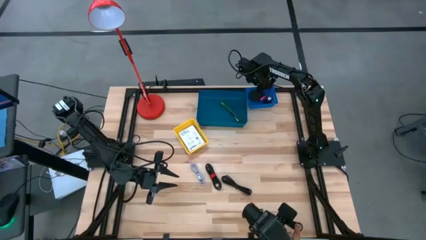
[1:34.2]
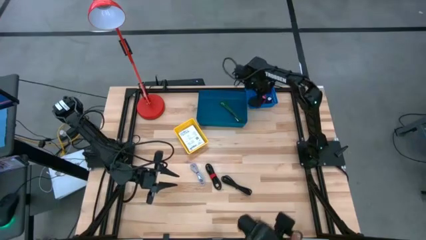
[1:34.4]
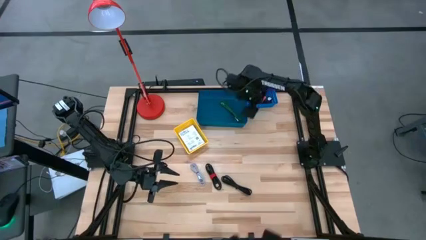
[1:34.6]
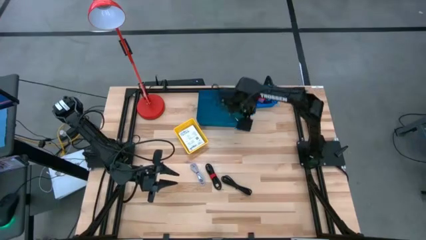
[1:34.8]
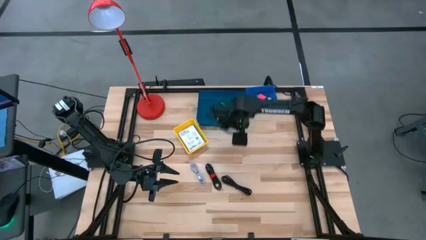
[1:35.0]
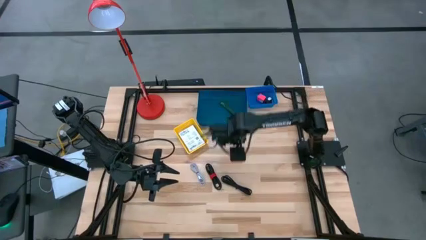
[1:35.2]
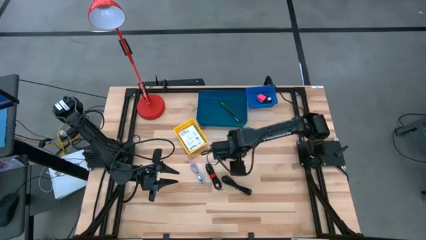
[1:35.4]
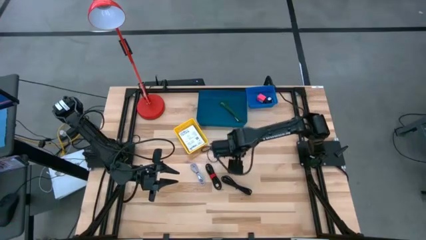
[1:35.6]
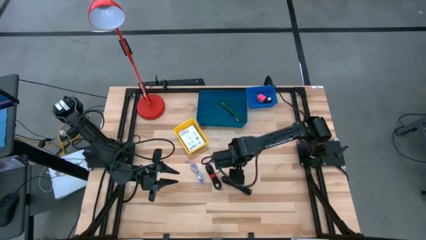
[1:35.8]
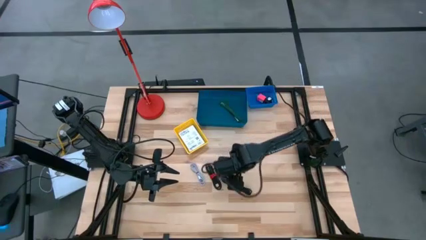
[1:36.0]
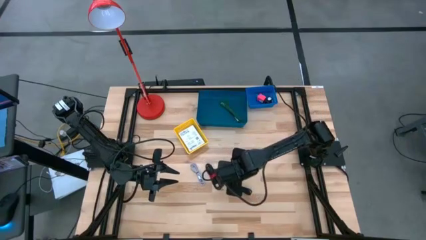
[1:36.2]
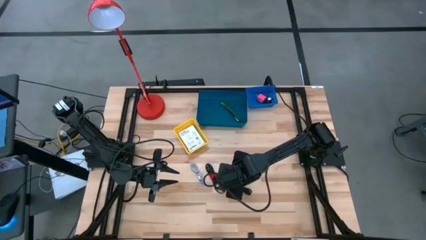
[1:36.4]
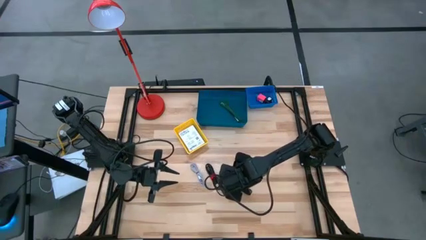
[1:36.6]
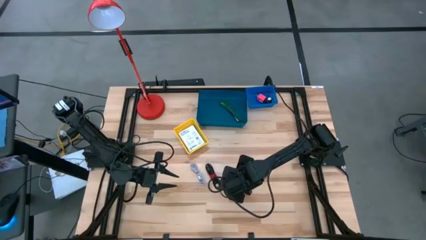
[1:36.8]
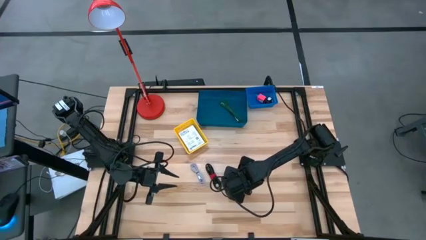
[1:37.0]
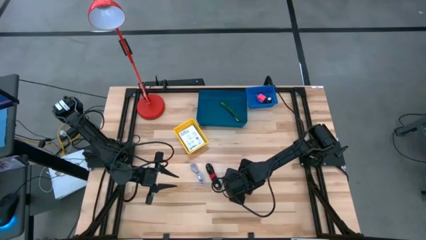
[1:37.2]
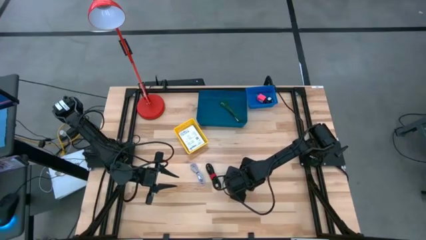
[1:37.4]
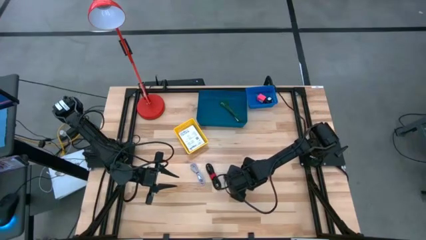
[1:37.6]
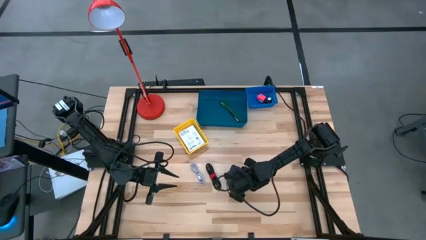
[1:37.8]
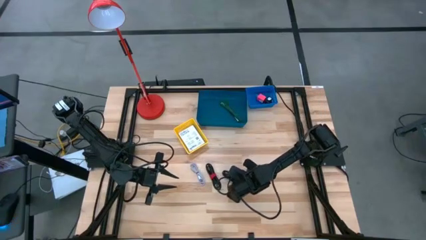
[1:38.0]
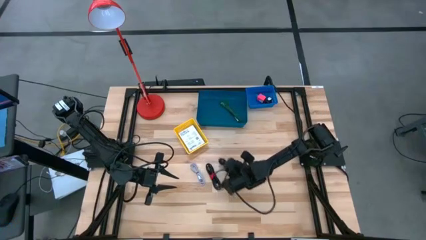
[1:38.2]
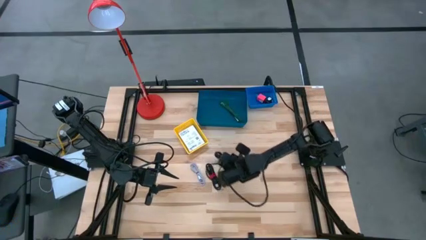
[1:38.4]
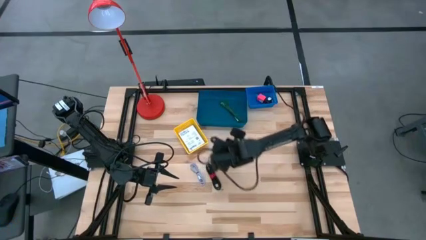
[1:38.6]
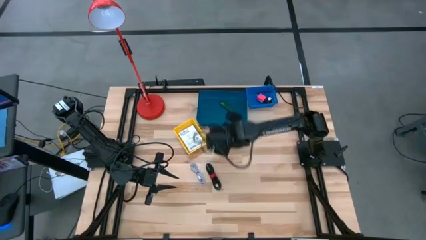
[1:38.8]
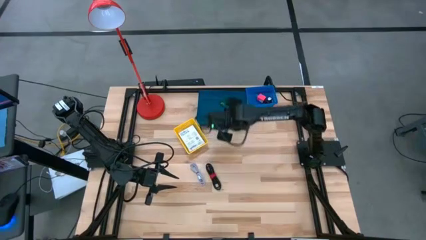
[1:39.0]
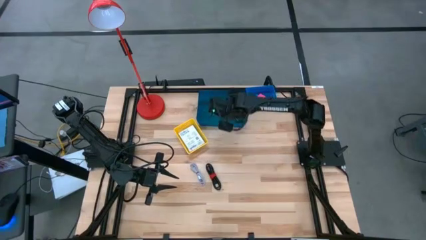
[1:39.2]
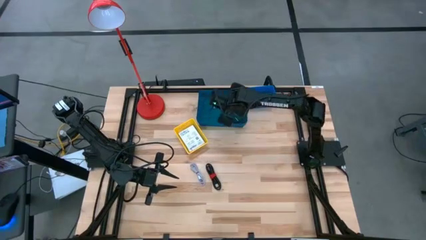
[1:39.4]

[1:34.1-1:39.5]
Task: Pick and place items into bin
Put the right black charger cable into the dark blue bin

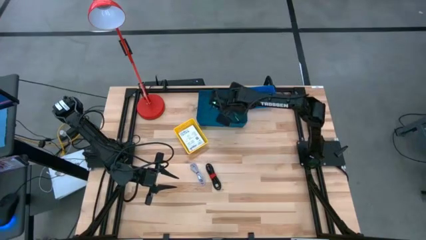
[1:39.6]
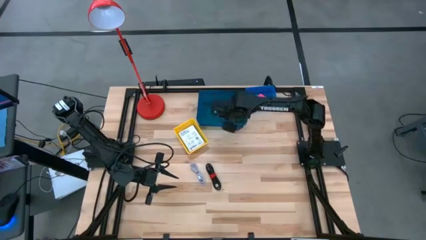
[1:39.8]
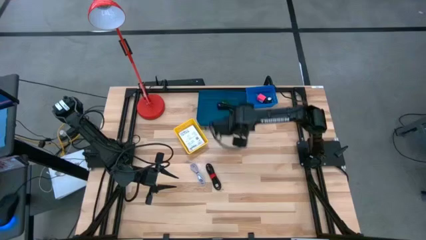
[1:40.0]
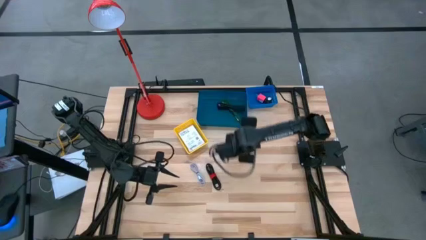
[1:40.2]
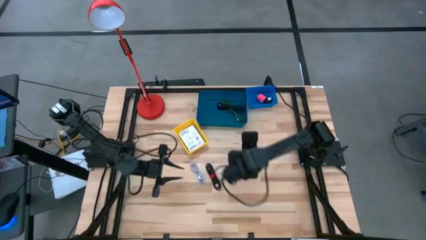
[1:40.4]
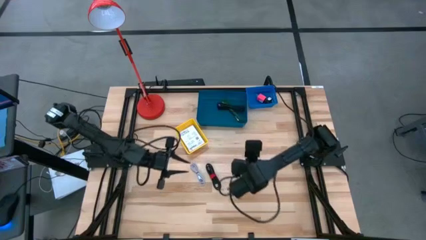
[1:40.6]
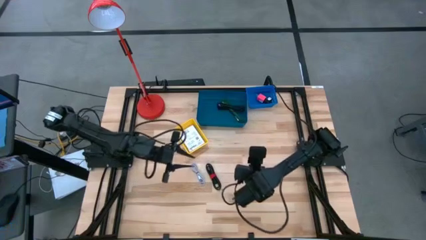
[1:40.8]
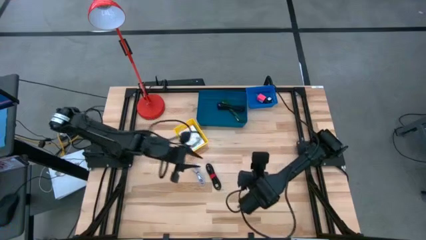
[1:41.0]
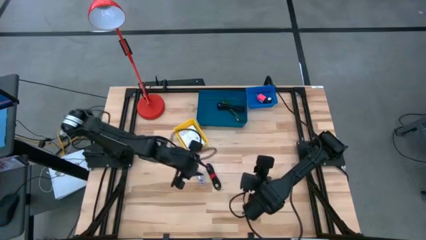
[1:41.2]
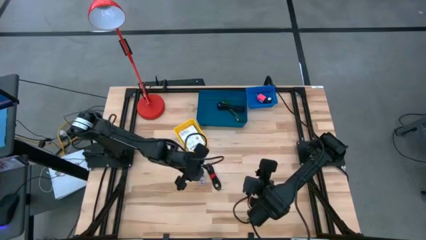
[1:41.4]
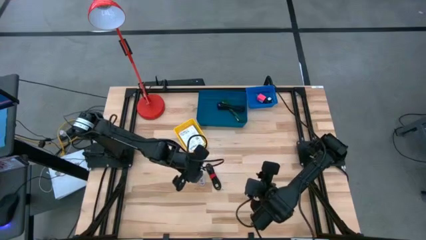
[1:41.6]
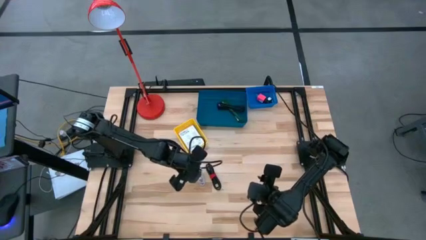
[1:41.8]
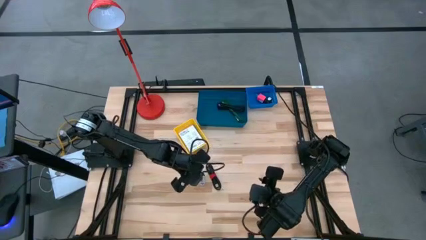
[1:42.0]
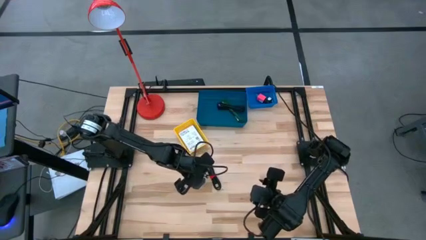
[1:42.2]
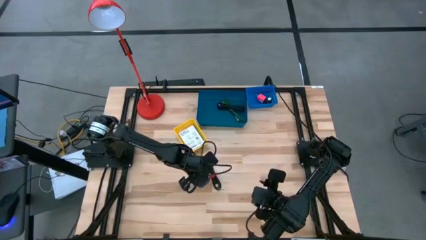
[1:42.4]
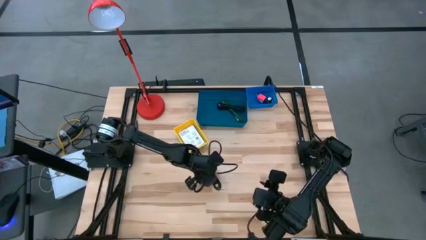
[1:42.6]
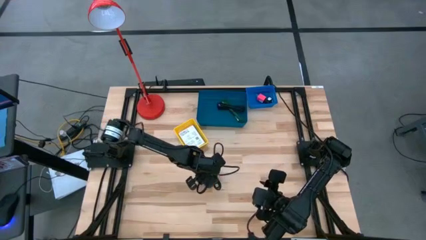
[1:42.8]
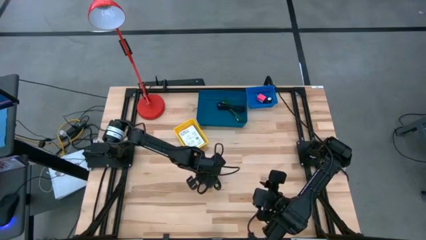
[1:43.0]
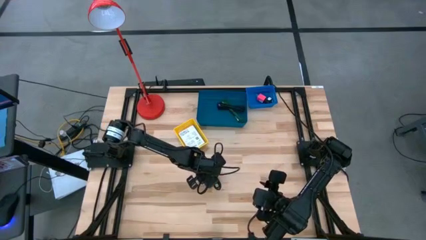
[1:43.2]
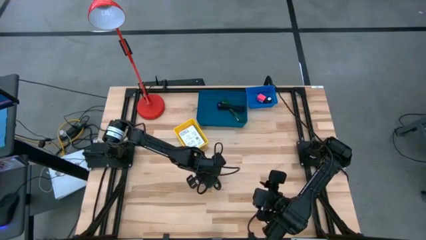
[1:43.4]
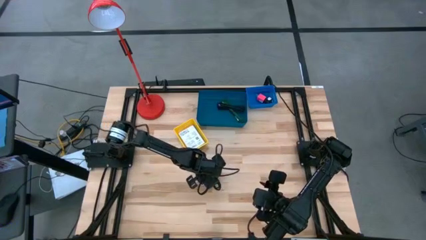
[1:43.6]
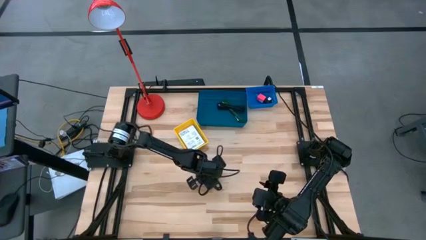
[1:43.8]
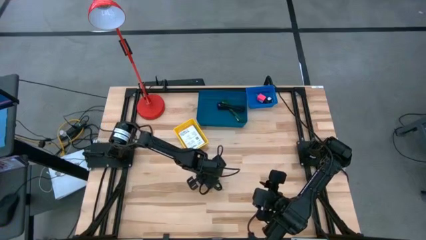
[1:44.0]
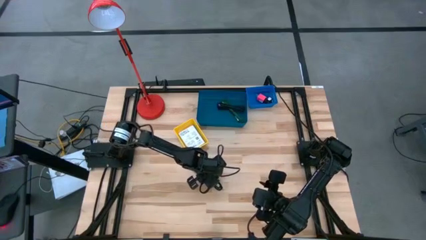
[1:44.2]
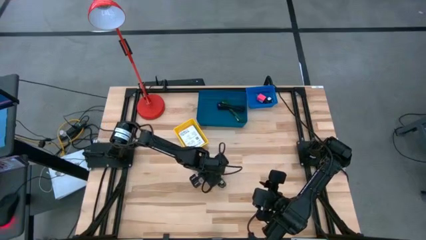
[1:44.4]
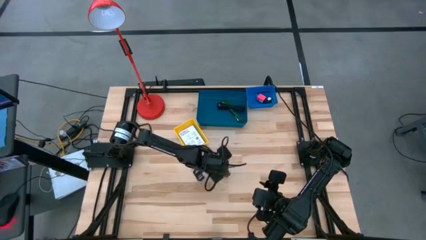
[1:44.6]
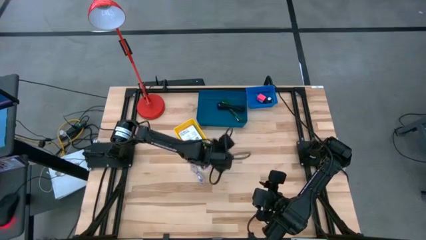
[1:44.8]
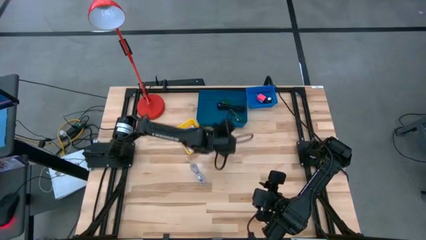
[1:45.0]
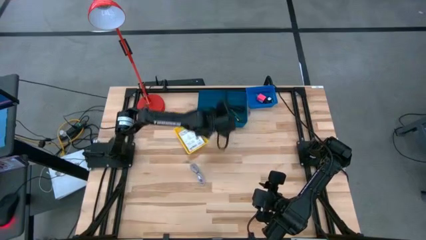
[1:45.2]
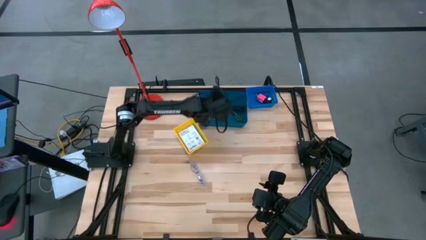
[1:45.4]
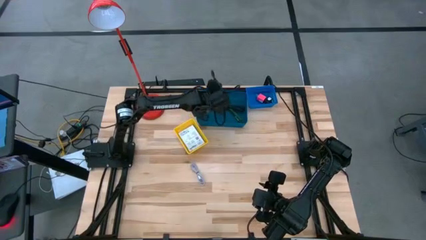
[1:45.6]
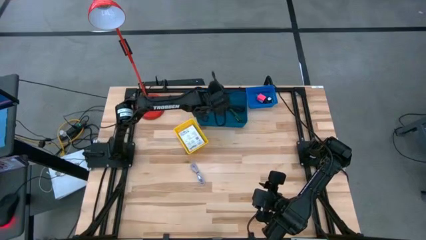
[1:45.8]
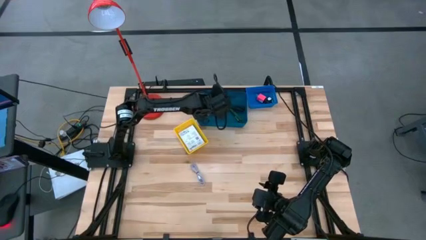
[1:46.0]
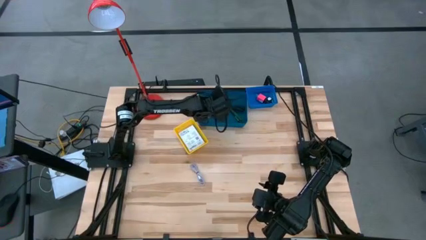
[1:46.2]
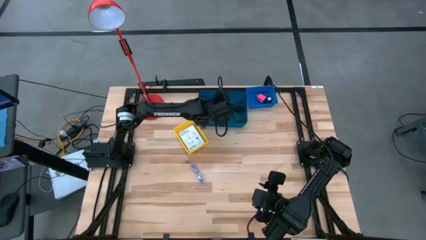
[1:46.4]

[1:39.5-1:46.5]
Put the black charger cable into the dark blue bin

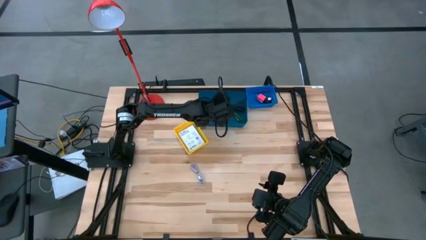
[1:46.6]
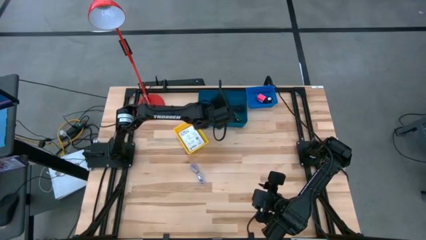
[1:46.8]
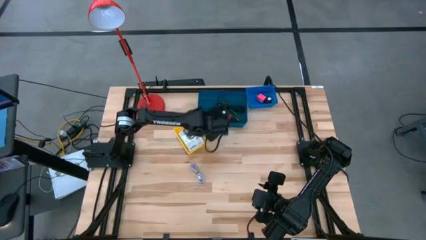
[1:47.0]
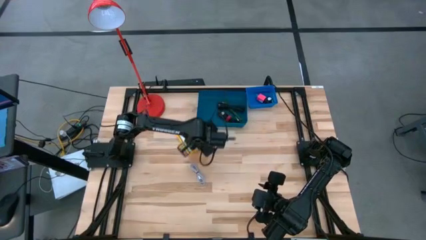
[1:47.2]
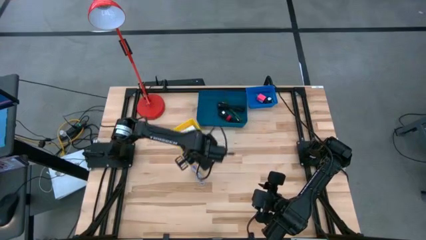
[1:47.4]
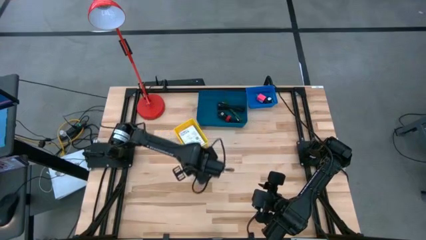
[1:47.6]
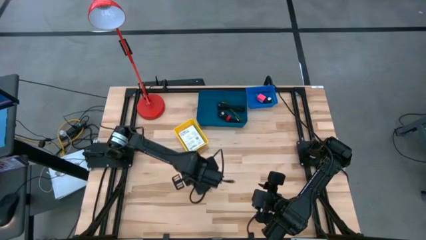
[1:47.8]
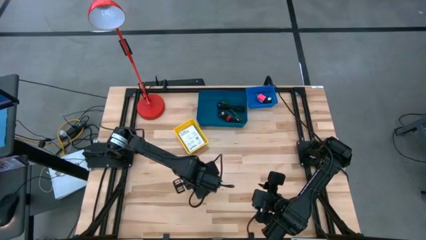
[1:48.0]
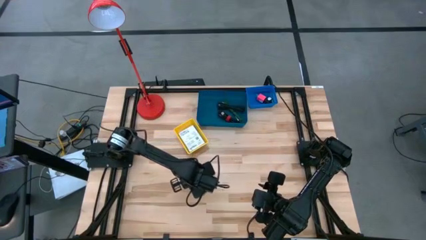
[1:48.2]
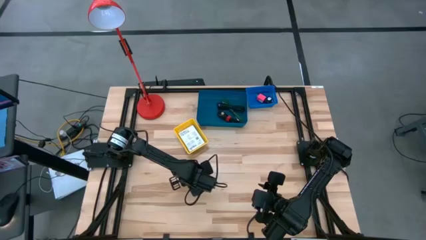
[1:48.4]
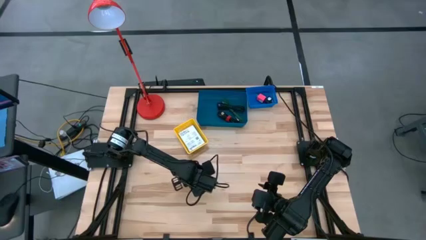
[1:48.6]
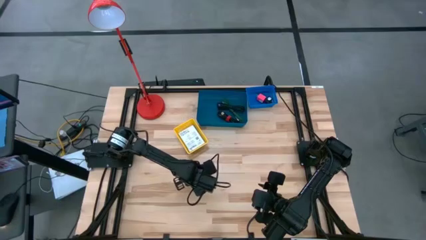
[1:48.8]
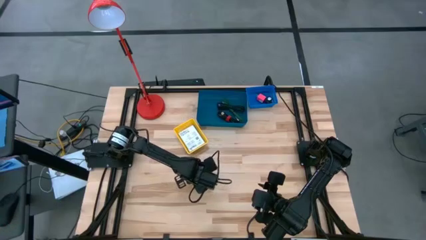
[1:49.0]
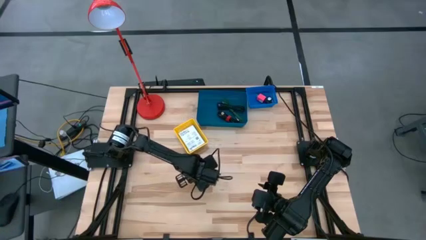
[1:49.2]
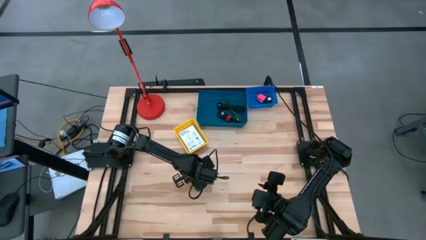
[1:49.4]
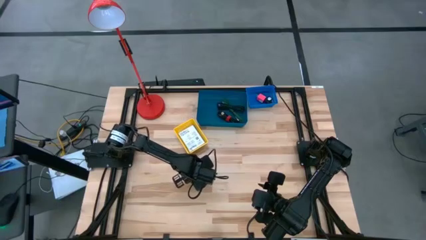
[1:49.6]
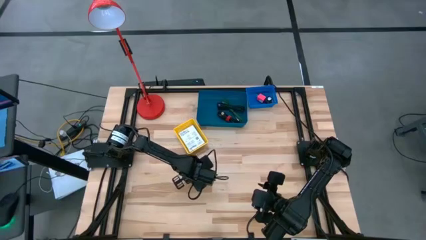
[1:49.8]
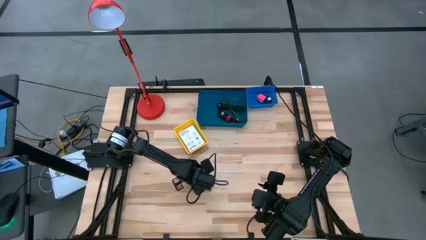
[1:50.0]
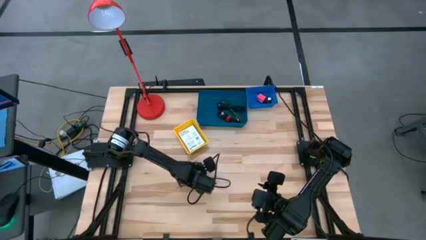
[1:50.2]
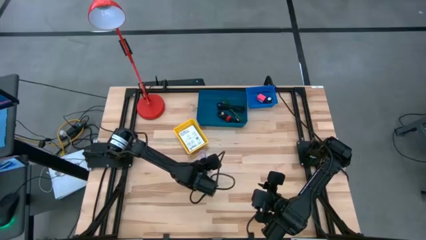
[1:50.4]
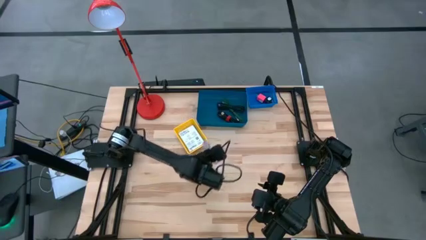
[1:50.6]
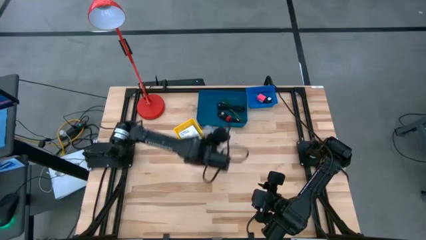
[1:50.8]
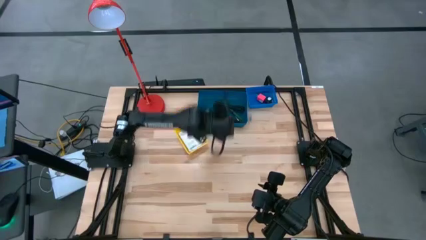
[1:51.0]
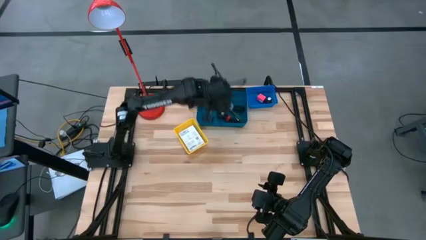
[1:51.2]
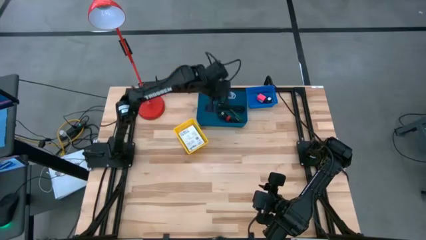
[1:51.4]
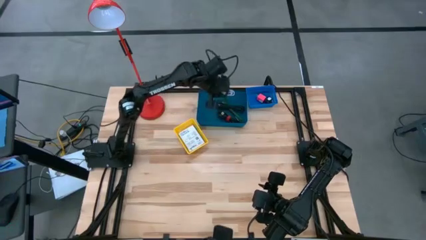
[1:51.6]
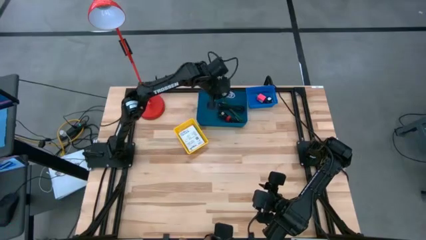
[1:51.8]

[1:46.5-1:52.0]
Put the white charger cable into the dark blue bin
